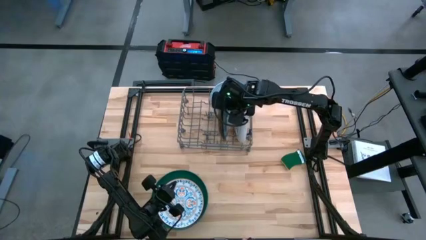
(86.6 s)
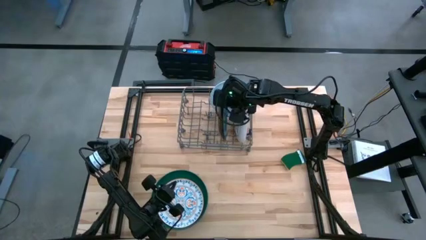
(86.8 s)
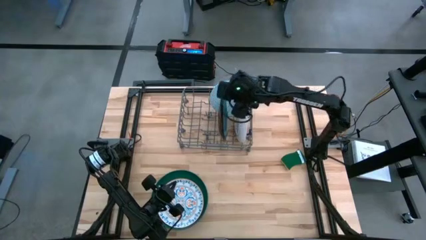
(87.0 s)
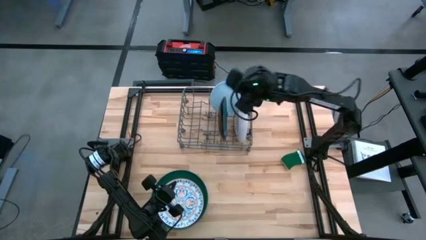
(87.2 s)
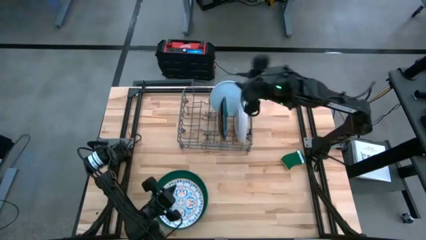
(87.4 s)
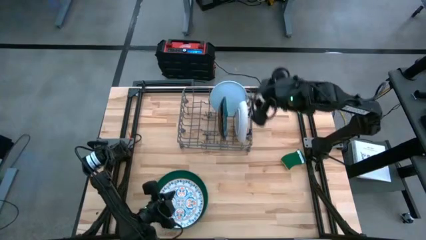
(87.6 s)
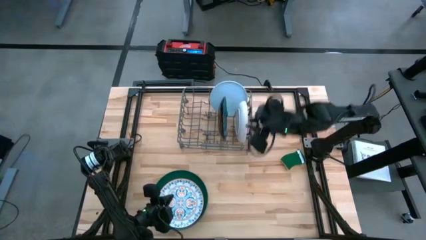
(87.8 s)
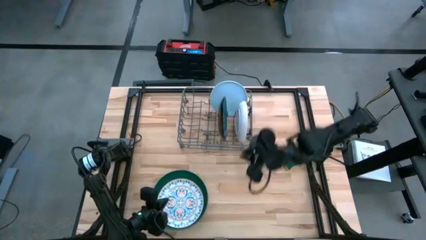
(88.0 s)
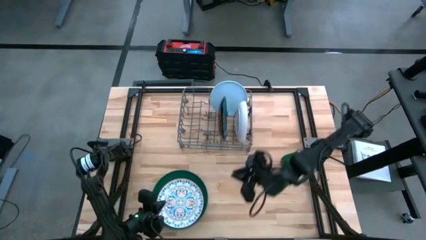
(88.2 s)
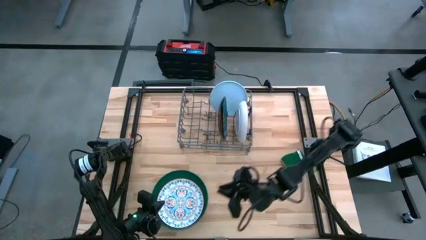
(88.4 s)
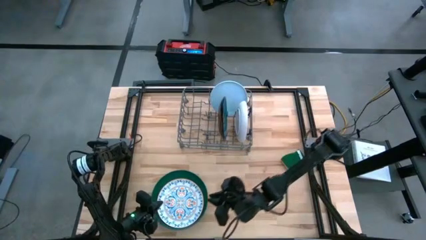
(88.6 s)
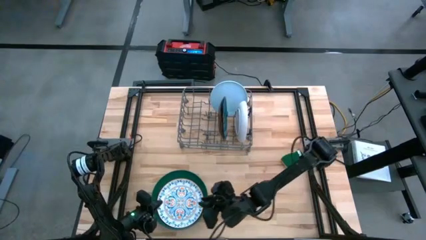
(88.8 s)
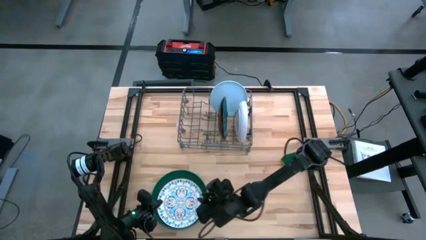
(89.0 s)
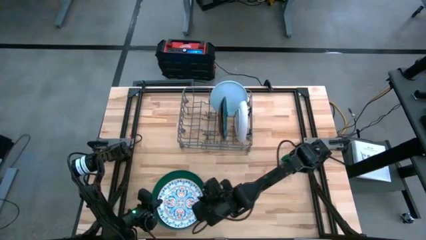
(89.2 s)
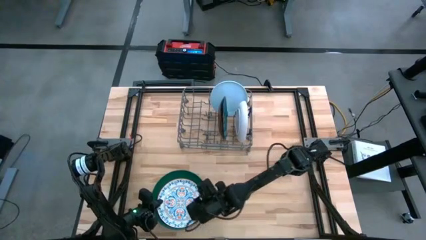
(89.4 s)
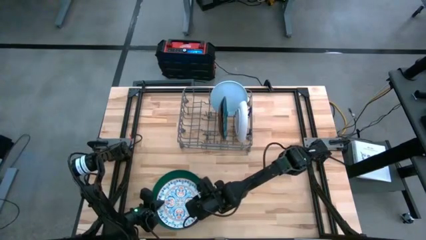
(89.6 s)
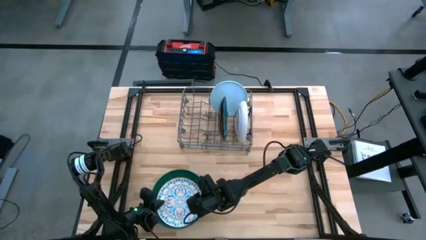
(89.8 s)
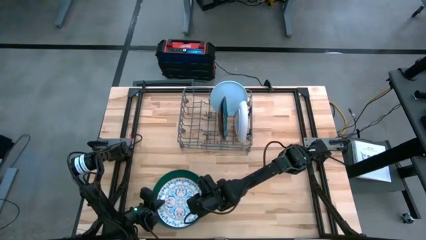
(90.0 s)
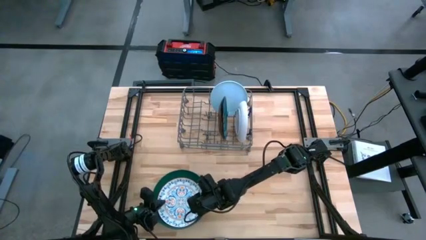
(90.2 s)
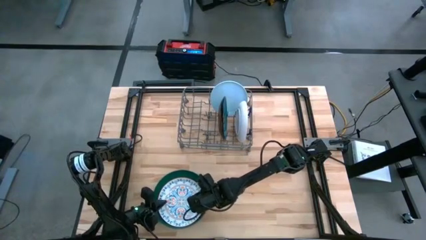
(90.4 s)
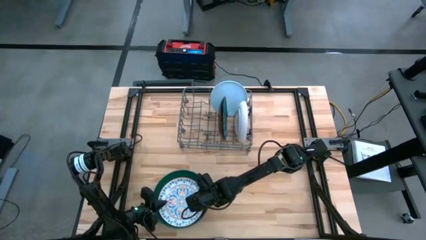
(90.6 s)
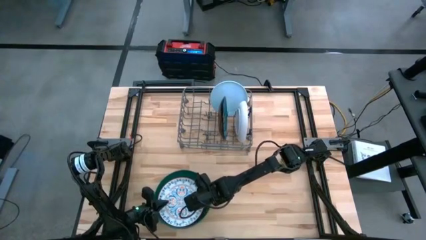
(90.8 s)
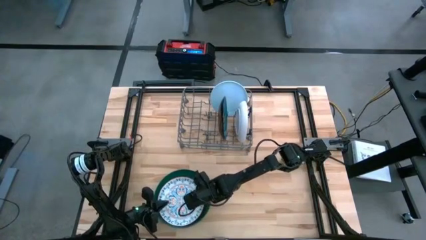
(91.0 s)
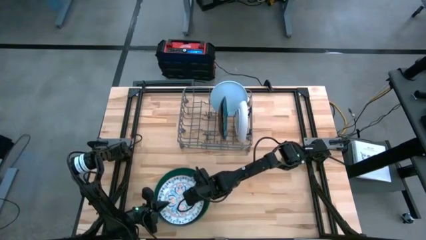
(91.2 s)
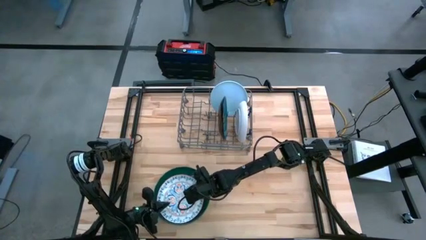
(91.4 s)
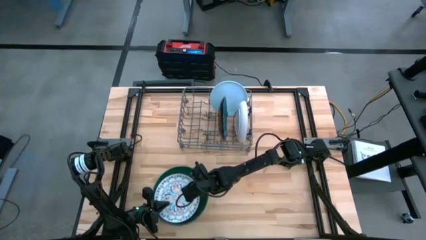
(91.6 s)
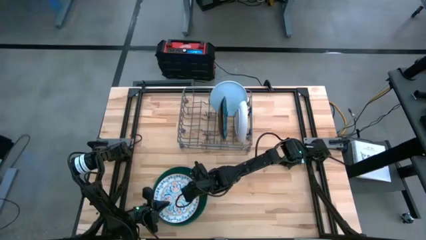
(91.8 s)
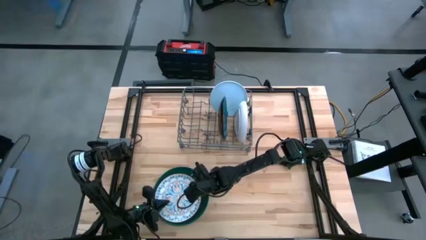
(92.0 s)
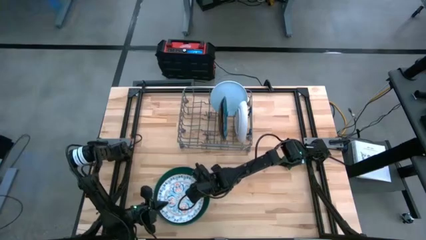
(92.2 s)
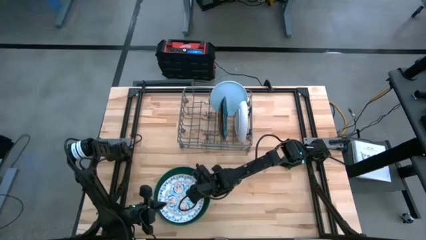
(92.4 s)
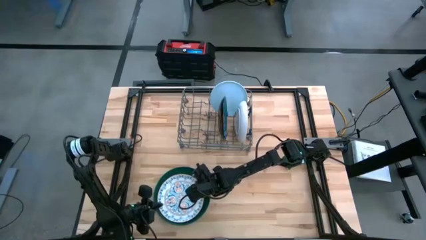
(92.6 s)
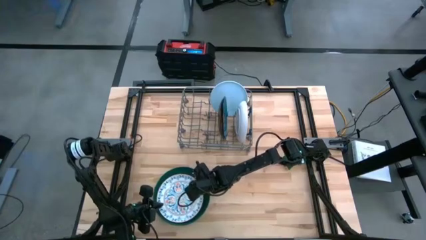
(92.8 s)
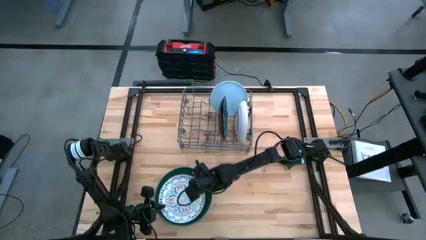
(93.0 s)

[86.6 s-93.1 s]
Task: Sort dishes
Put the white and blue patterned plate in the dishwasher rack

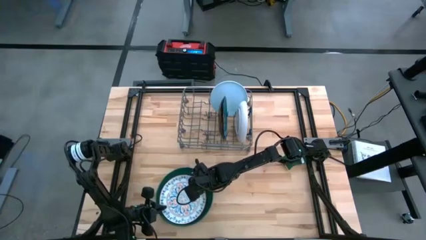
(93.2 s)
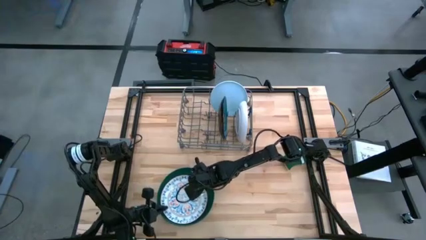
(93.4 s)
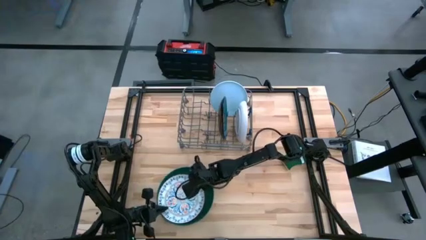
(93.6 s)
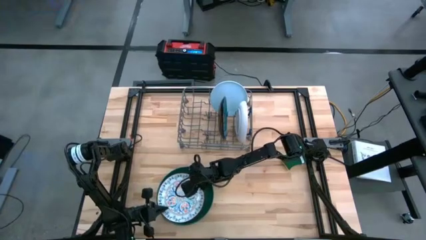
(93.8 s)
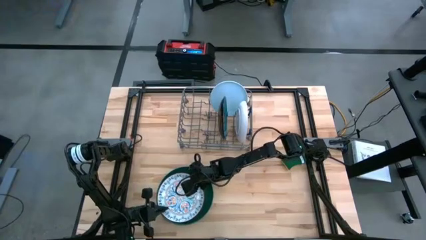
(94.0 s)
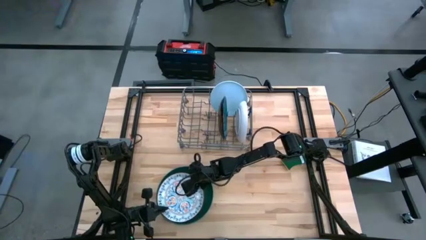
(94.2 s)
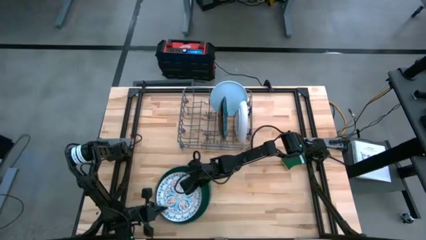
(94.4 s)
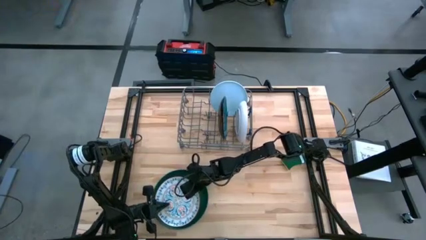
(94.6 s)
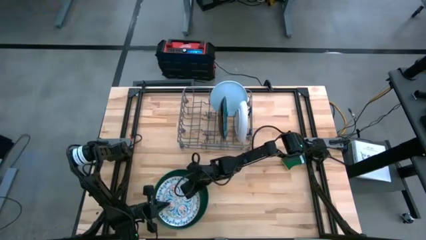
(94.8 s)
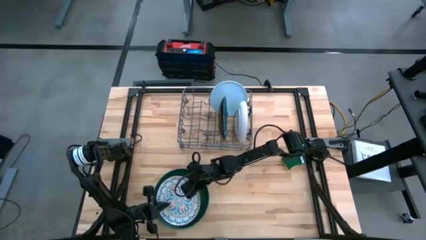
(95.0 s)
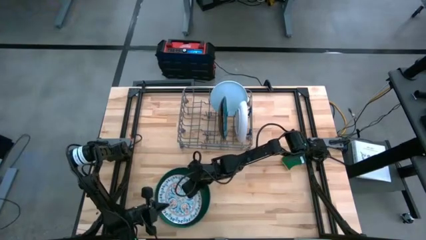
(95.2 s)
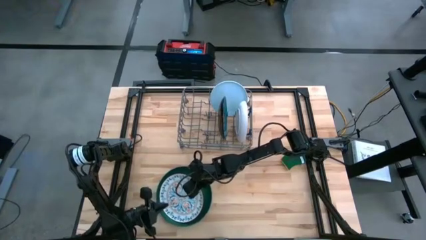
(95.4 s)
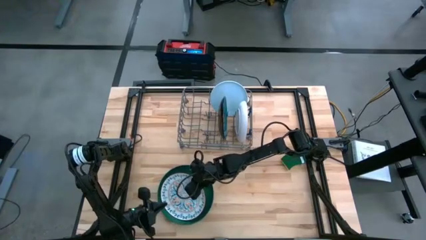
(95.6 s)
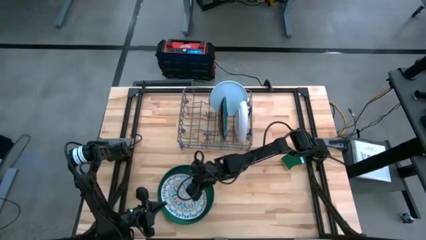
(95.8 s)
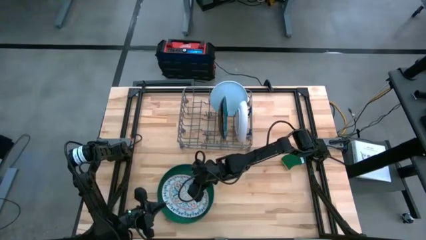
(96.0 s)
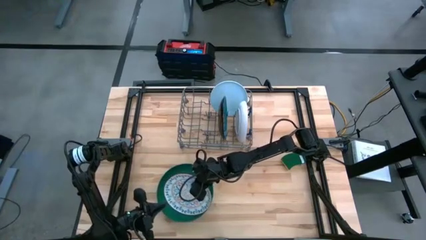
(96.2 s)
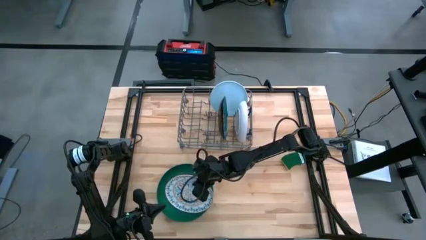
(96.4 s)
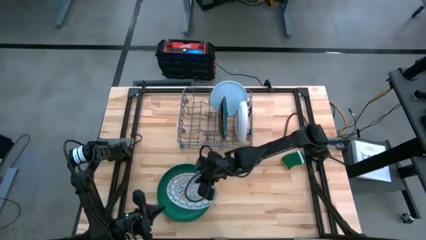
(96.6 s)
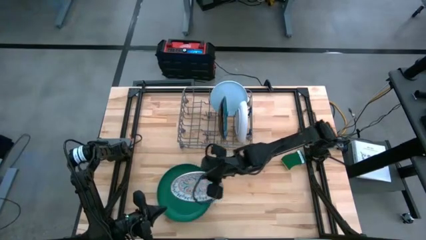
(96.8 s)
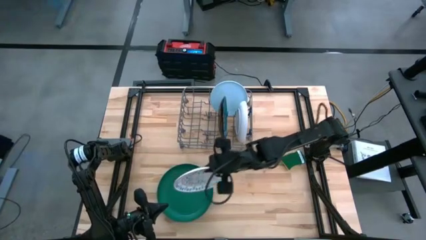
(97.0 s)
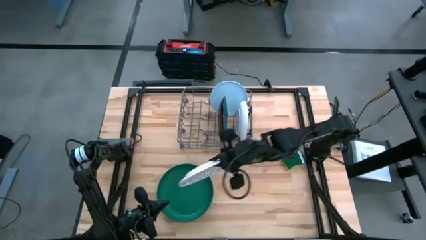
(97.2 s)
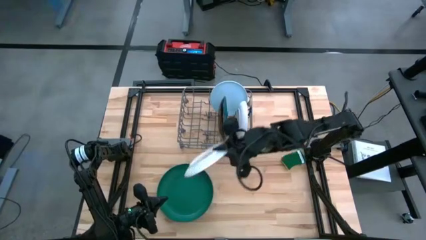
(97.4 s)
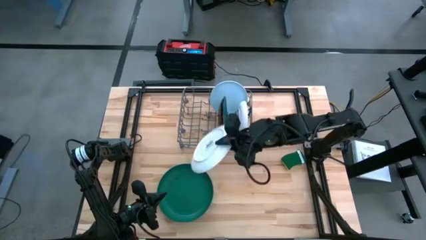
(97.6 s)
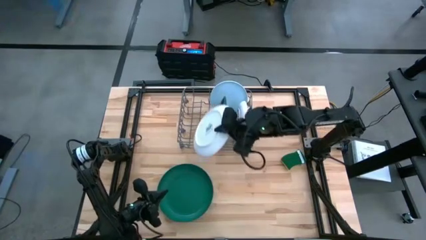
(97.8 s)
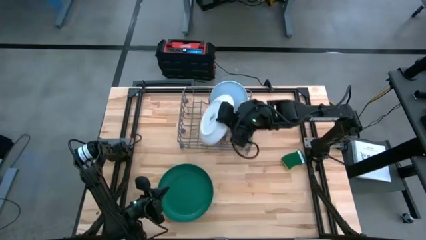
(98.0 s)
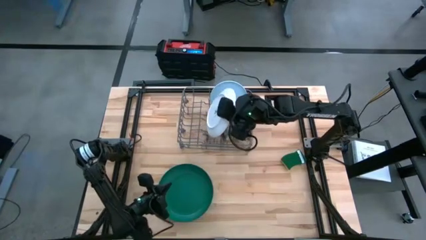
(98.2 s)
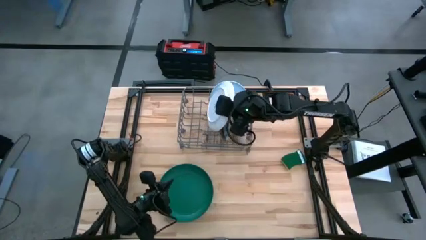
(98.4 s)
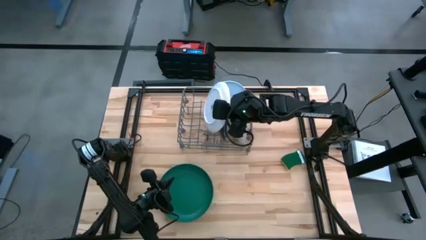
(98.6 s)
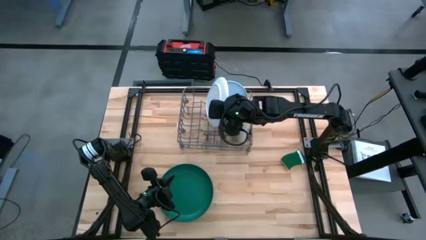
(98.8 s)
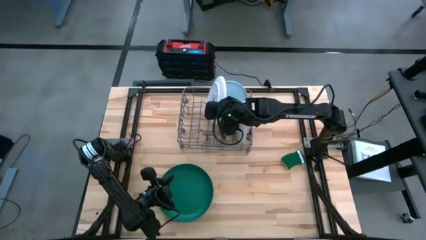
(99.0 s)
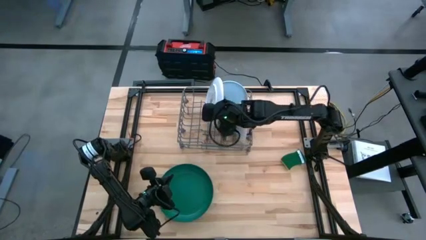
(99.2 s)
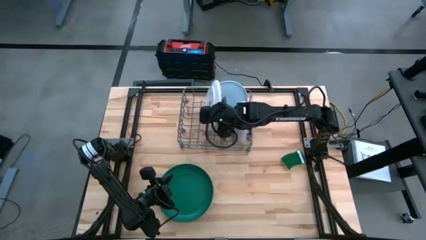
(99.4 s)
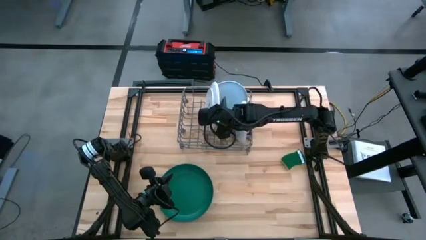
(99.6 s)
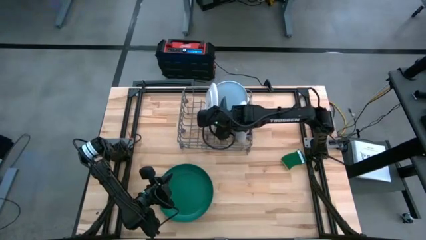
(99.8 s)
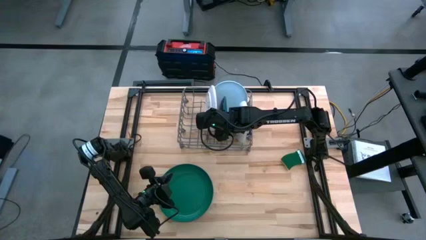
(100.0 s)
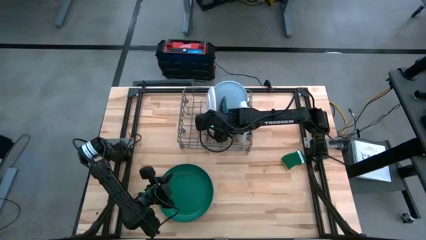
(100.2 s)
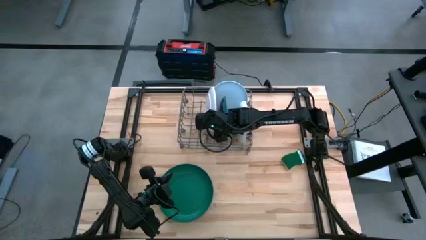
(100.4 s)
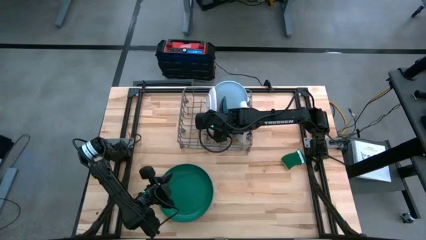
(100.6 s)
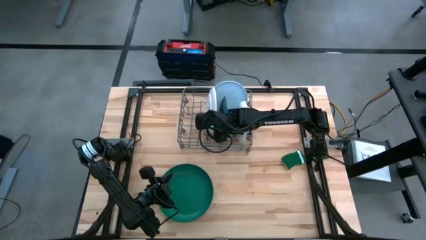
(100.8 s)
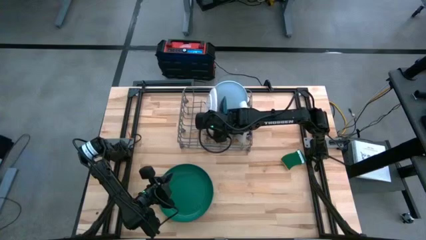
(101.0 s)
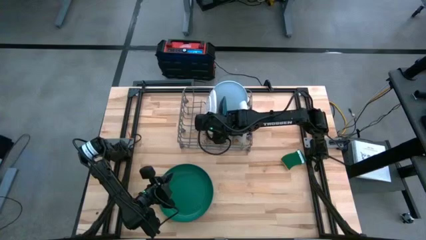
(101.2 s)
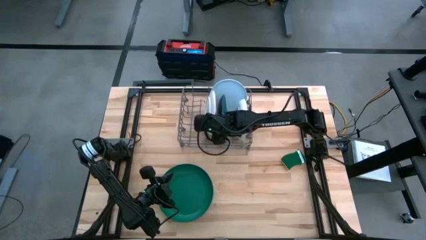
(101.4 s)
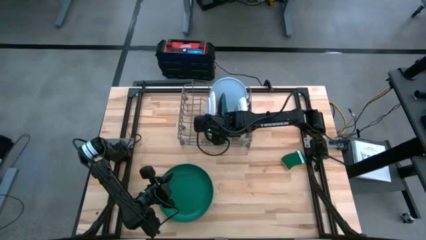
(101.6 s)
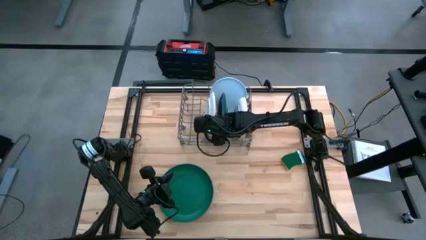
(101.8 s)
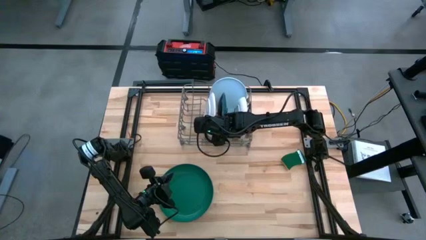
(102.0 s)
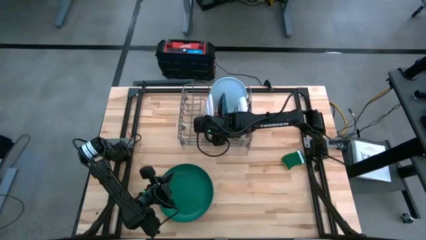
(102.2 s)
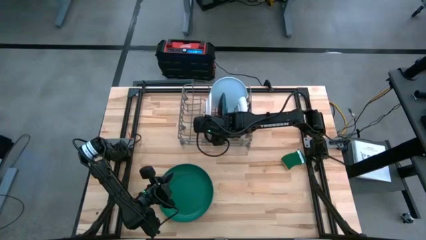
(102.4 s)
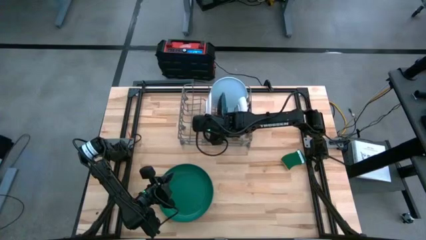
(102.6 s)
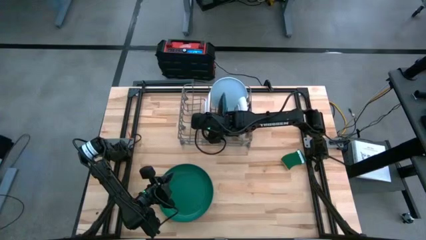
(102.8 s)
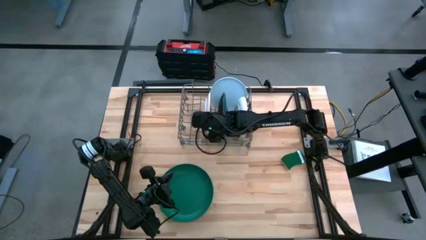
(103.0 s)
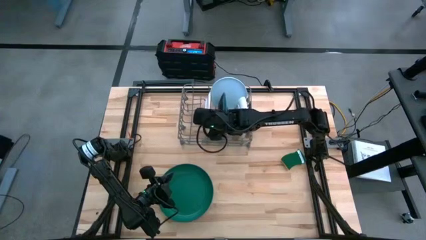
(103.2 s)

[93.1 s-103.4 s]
Put the white and blue patterned plate in the dishwasher rack
